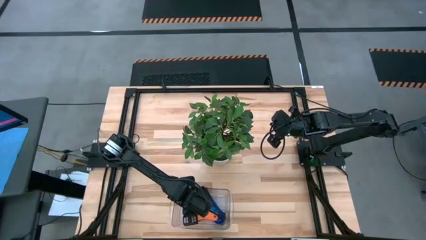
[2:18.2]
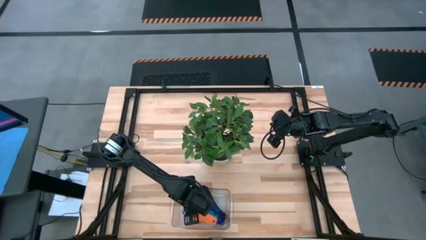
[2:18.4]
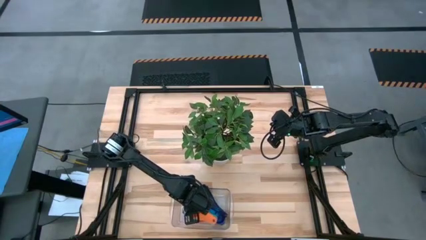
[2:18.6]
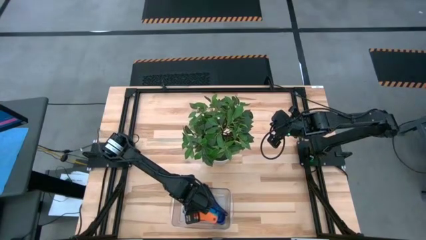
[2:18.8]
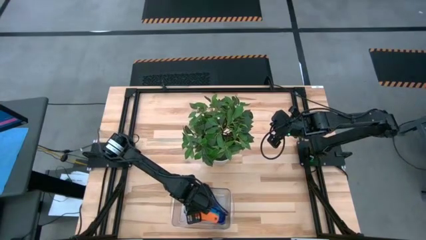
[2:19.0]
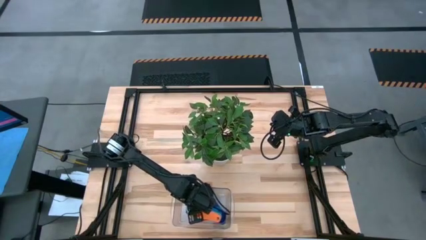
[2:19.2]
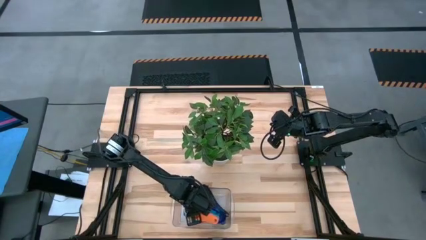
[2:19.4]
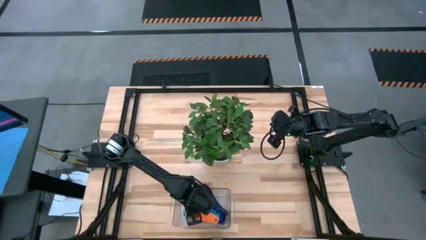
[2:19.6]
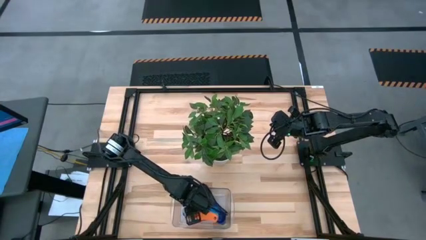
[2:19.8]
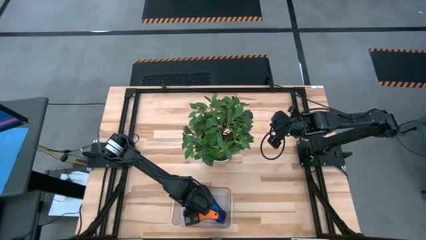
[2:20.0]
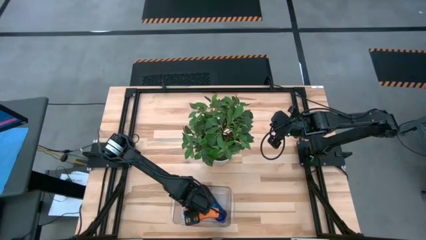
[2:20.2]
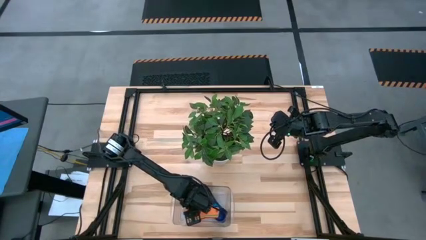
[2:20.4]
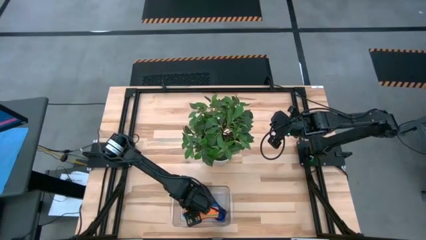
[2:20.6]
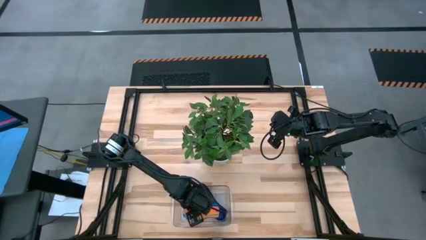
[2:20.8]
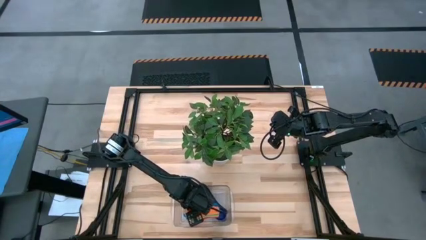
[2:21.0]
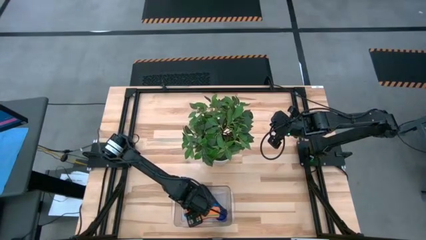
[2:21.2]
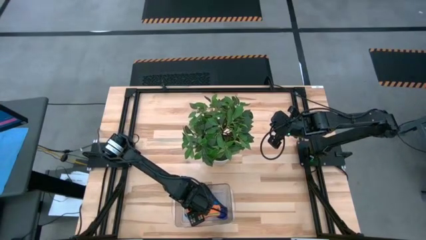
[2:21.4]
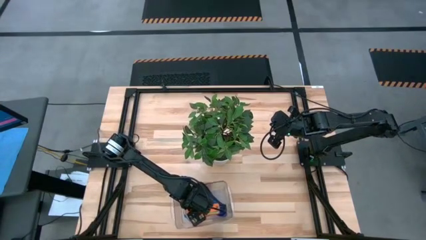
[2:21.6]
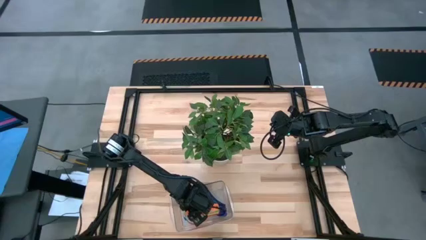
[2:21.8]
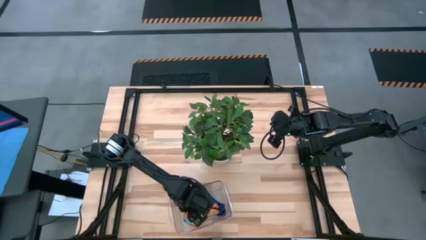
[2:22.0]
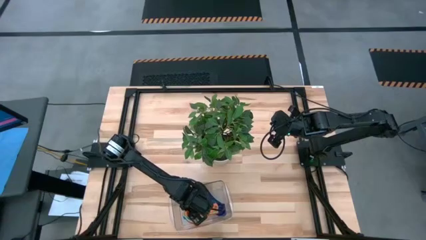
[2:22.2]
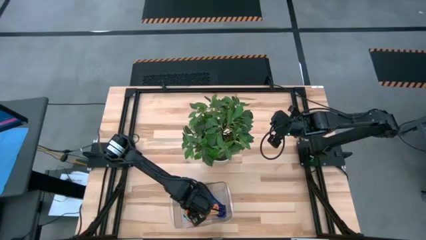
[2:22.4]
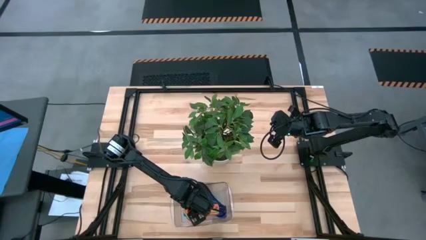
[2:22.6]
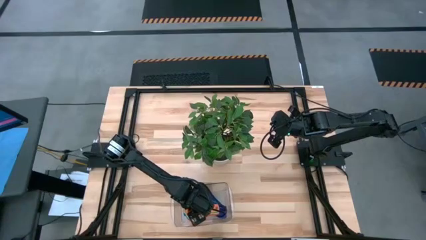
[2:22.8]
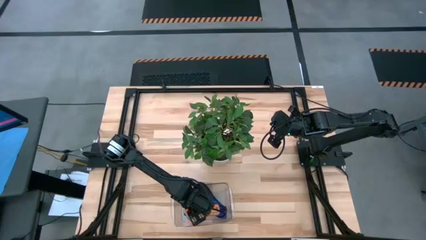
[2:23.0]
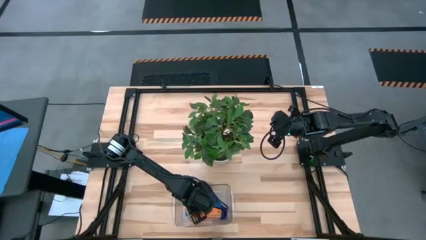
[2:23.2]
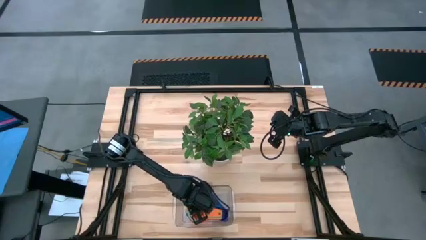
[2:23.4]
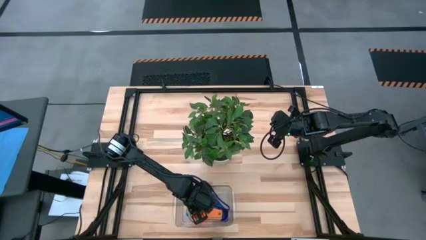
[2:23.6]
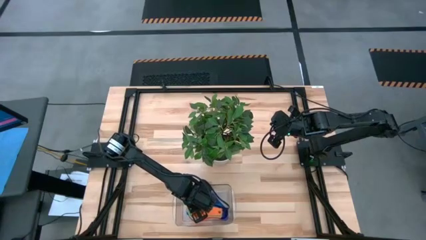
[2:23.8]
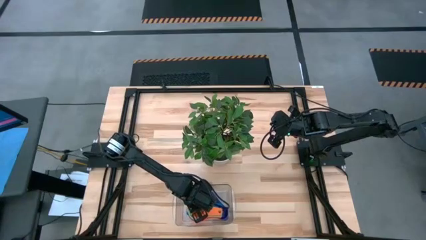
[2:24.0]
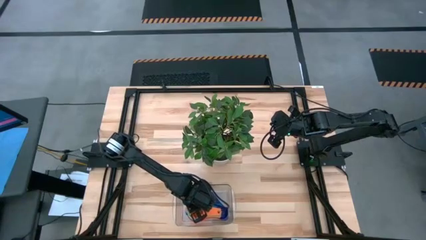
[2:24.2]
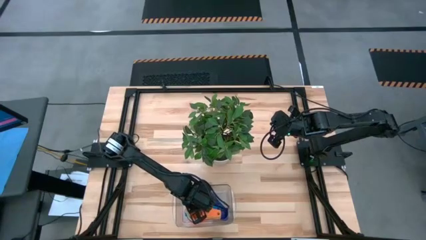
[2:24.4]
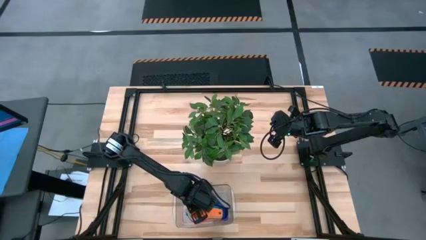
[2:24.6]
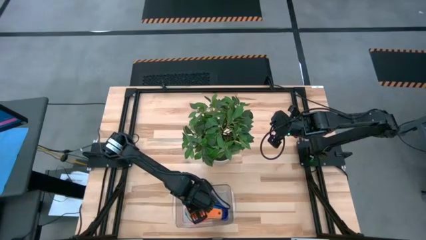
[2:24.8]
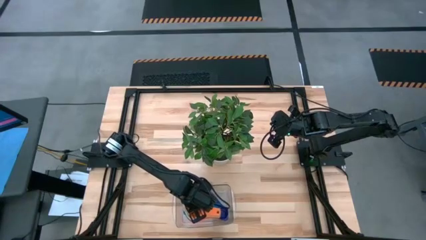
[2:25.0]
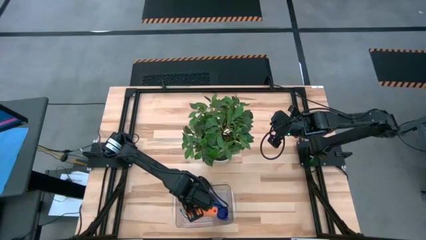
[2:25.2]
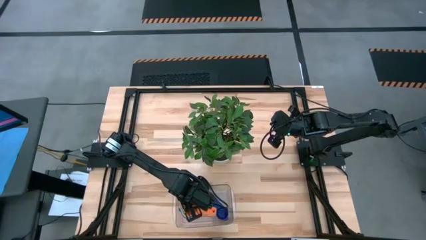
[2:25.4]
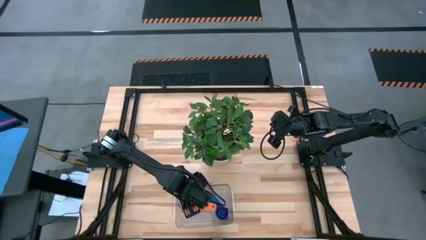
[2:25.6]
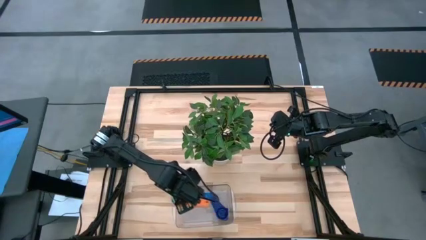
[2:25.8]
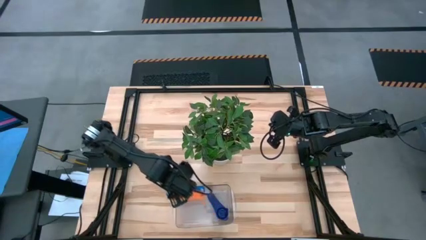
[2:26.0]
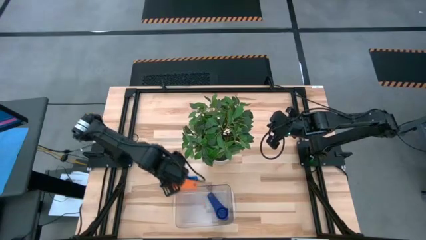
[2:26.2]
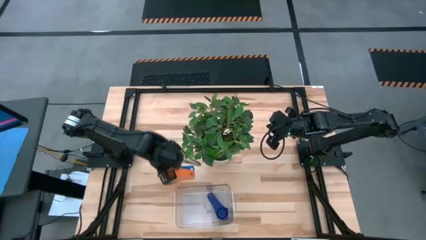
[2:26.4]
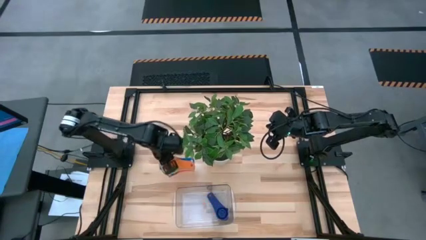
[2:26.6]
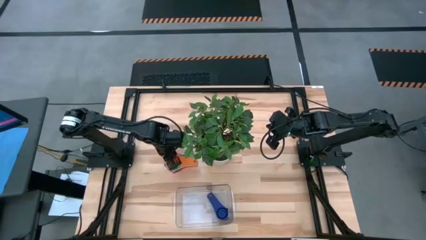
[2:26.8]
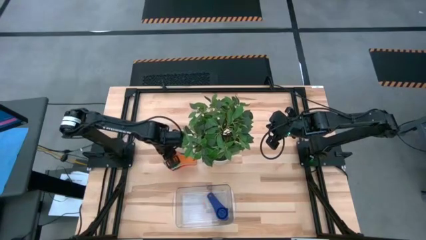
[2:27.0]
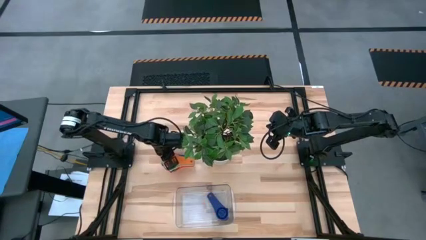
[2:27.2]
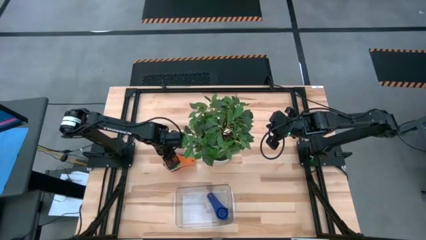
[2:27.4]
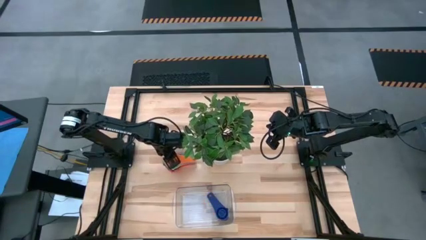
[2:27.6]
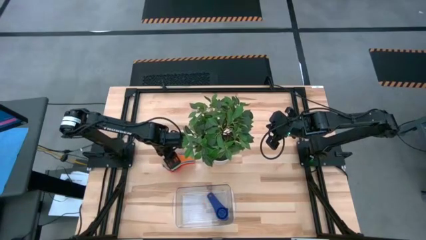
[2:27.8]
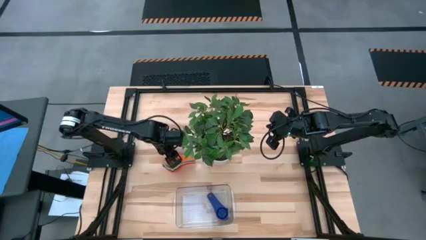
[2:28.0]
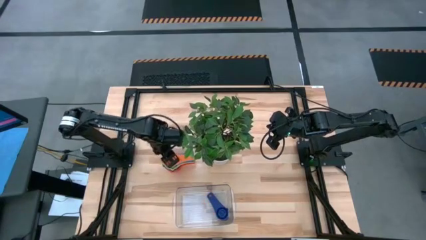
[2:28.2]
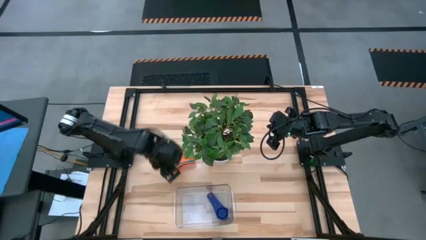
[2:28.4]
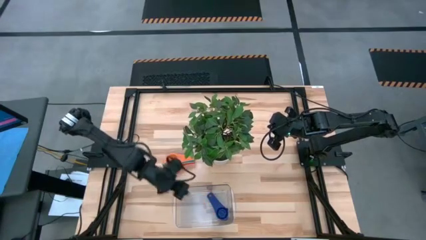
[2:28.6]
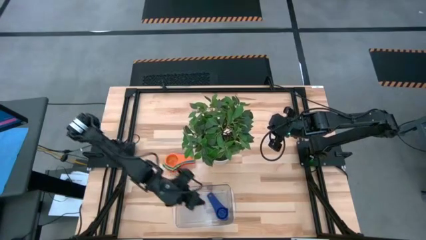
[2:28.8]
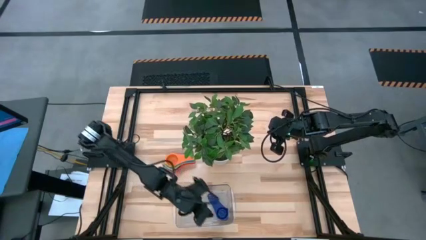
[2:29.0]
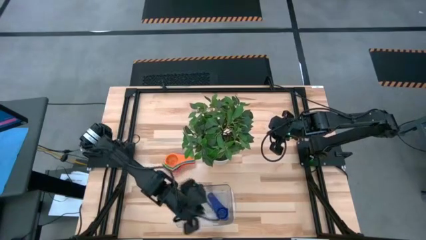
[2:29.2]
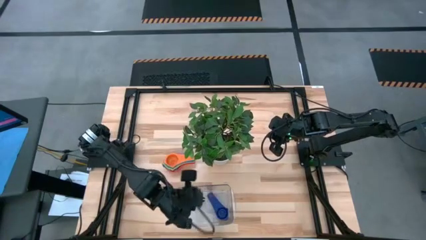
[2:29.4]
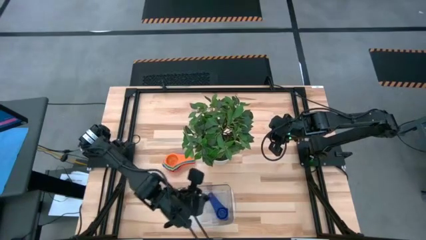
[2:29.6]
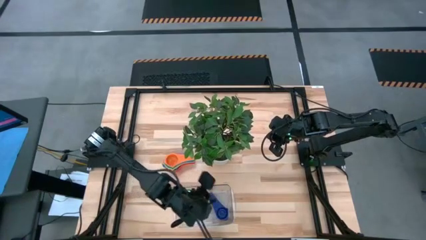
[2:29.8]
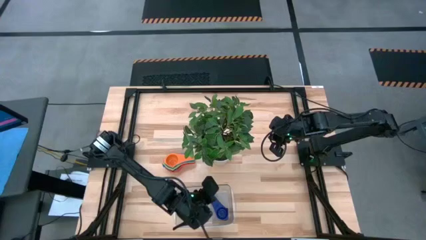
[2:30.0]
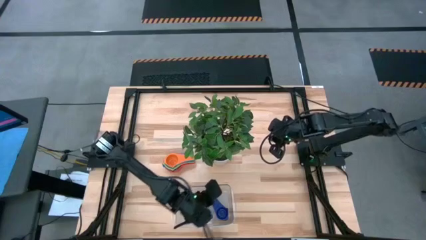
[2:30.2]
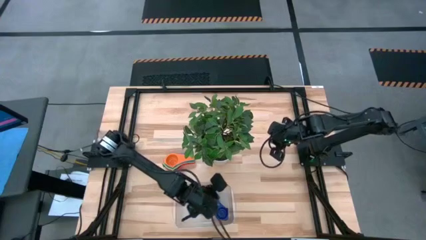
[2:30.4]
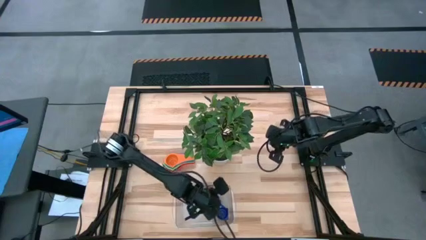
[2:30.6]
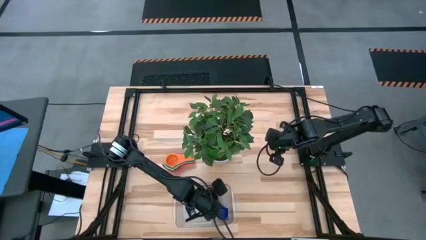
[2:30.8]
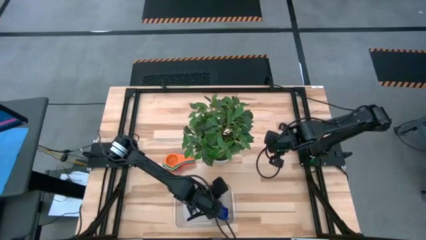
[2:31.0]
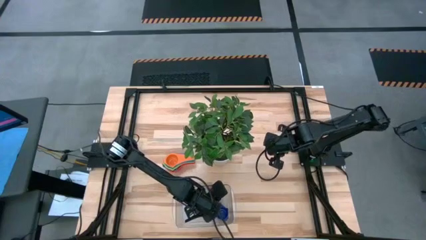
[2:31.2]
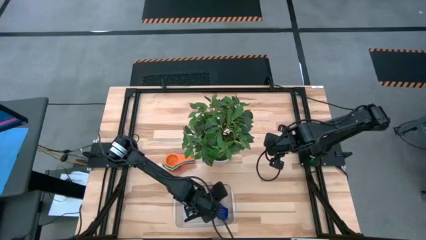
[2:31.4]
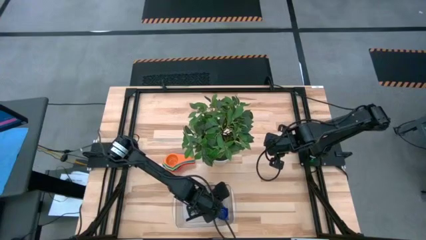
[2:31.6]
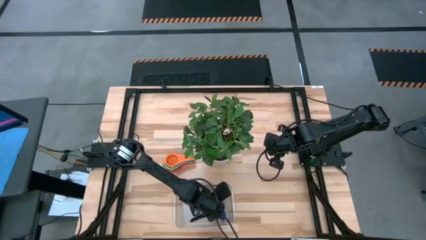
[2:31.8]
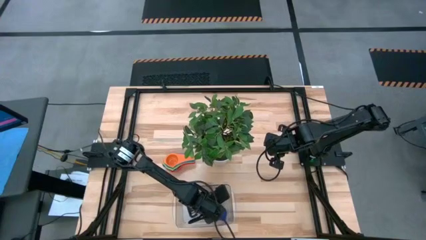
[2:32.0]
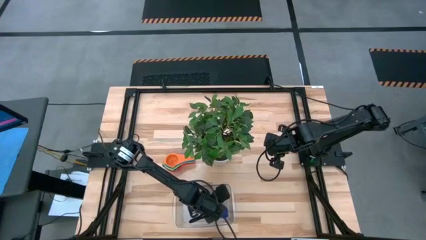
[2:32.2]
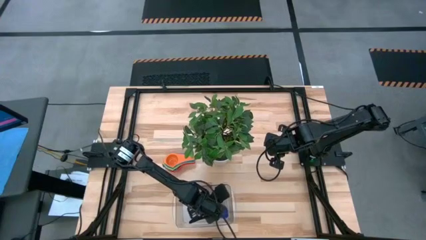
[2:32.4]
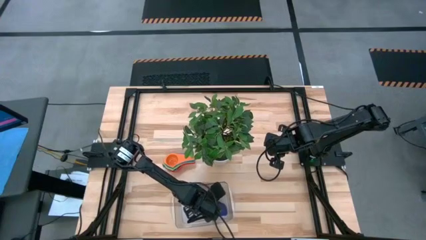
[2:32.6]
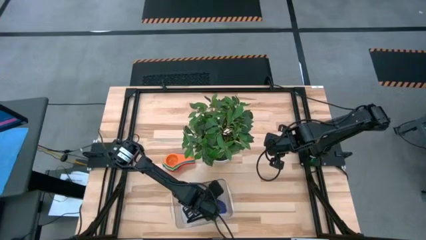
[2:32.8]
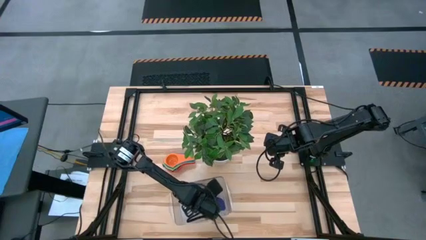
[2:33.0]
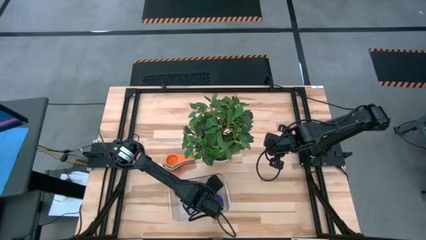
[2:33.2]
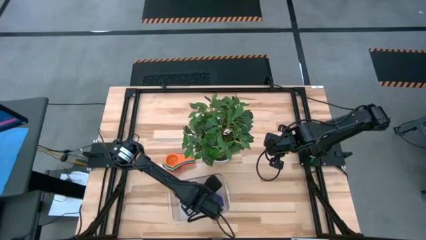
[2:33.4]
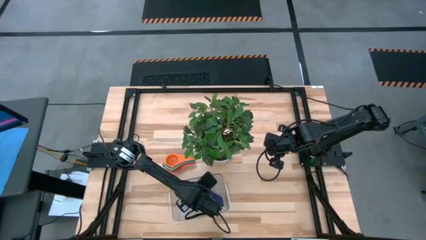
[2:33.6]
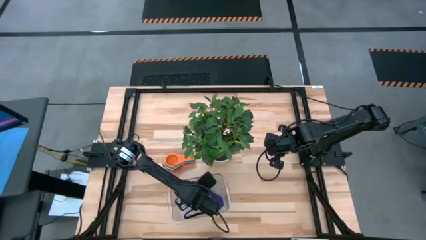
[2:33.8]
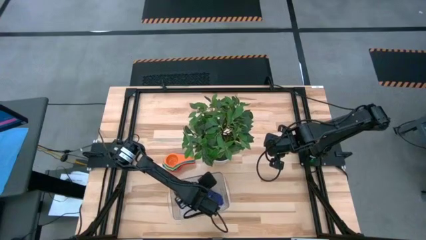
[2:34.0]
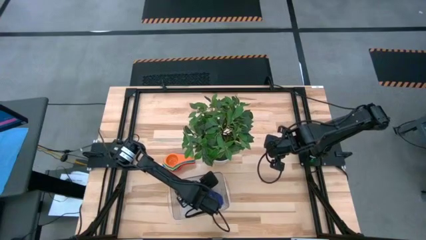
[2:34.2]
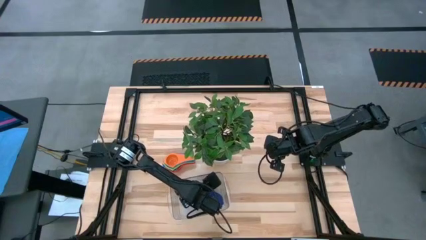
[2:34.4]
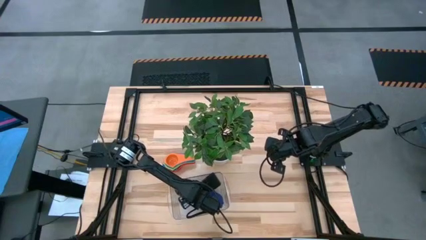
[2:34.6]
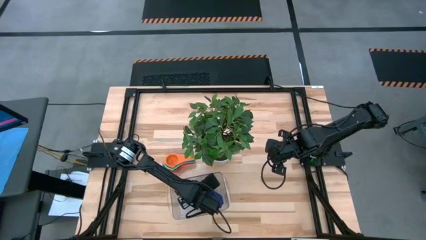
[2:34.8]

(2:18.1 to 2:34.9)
Task: Nest measuring cups in basket
Stack the dark blue measuring cup on the orange measuring cup
